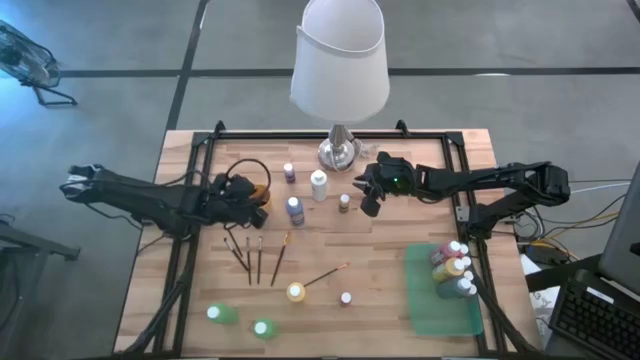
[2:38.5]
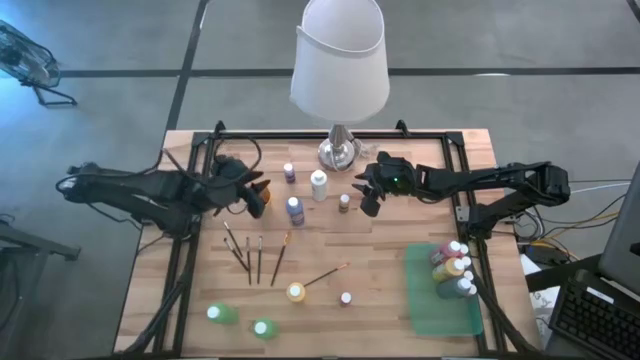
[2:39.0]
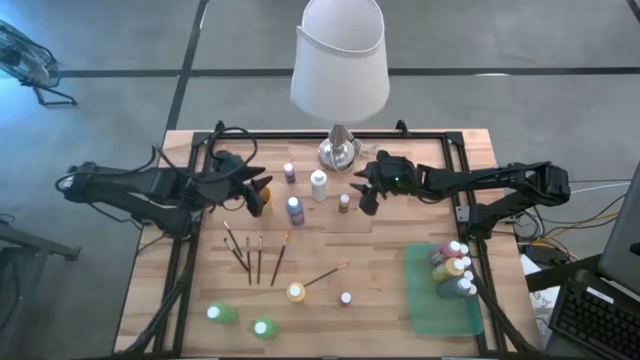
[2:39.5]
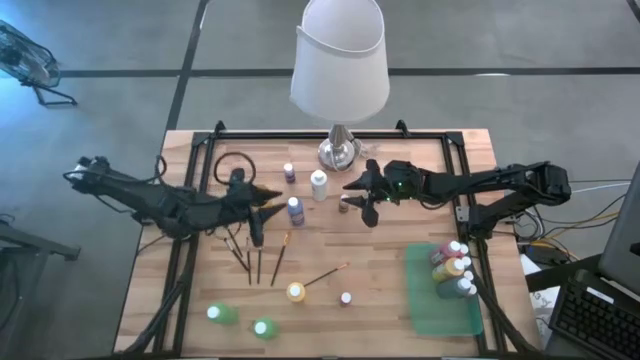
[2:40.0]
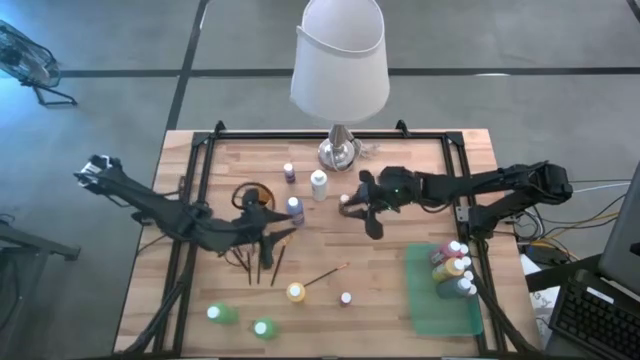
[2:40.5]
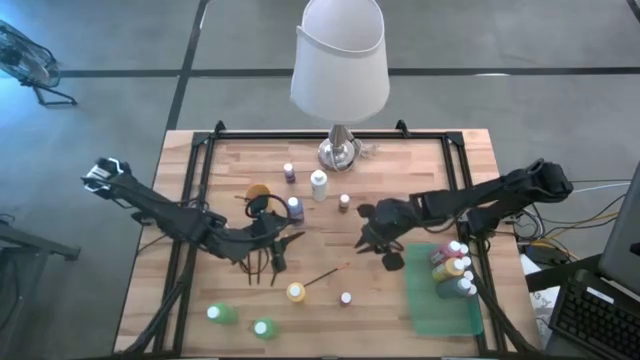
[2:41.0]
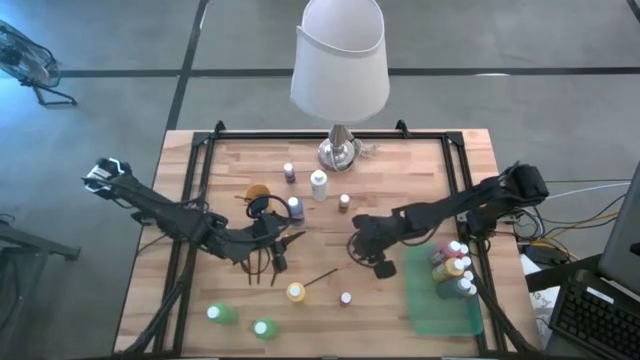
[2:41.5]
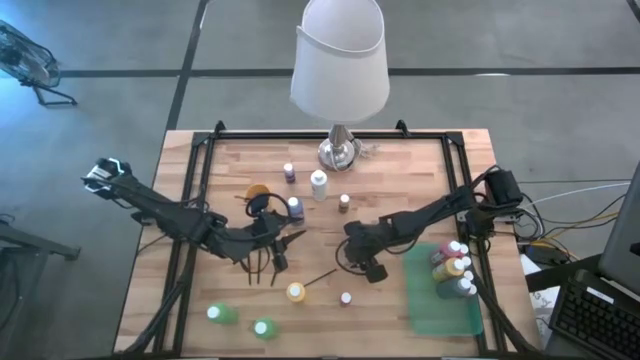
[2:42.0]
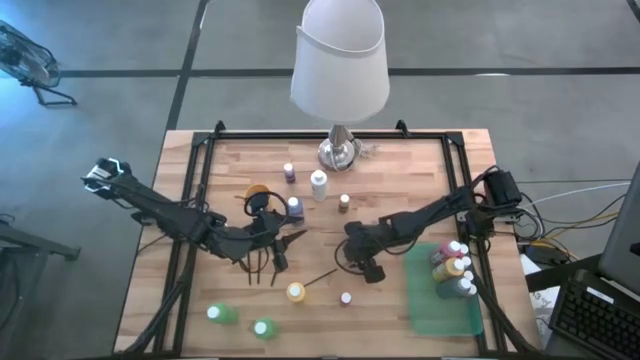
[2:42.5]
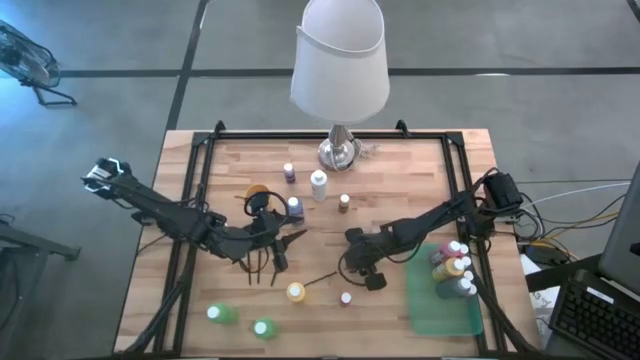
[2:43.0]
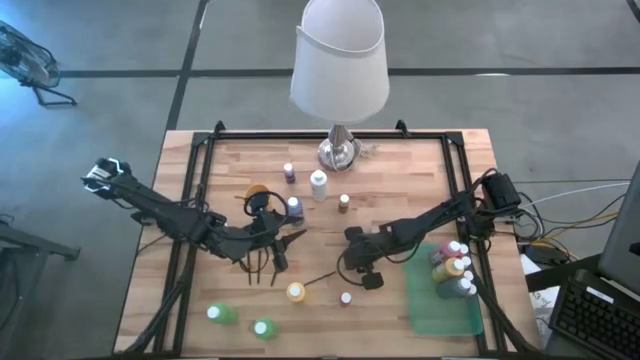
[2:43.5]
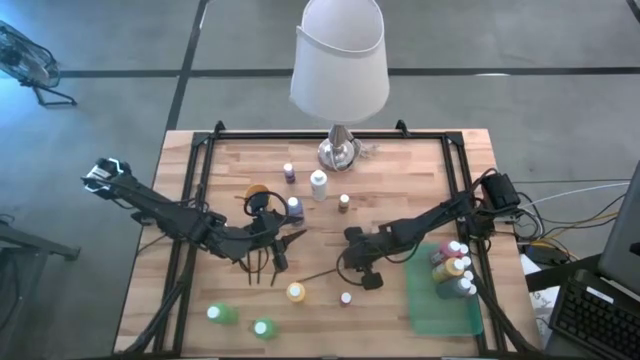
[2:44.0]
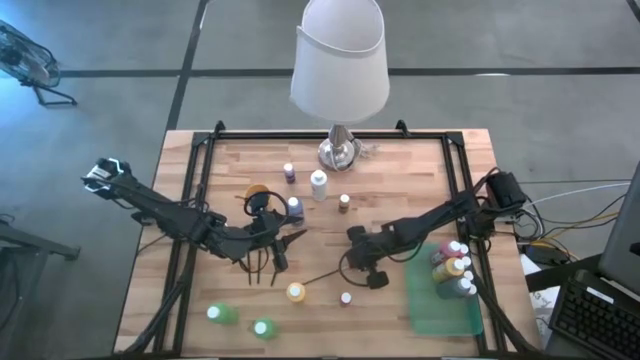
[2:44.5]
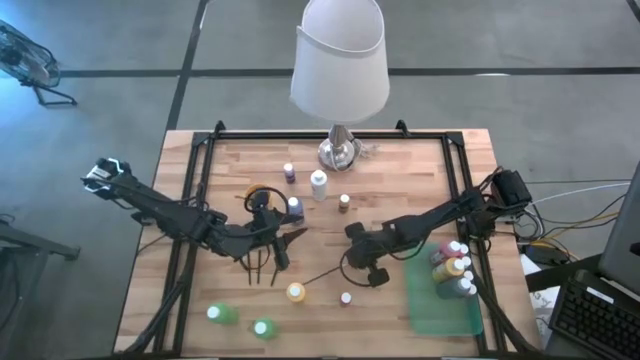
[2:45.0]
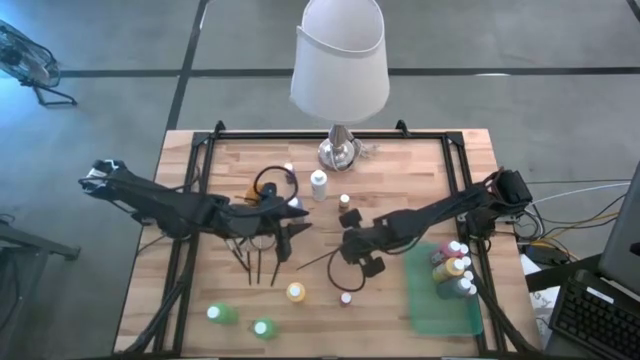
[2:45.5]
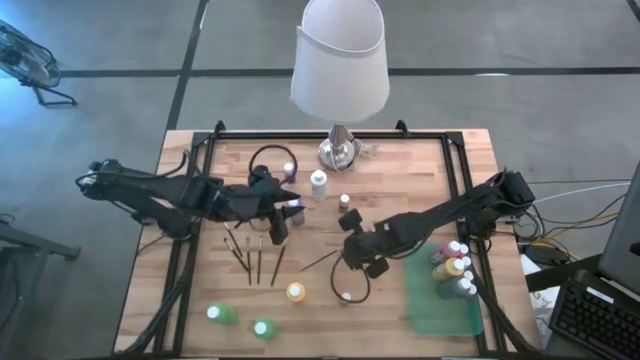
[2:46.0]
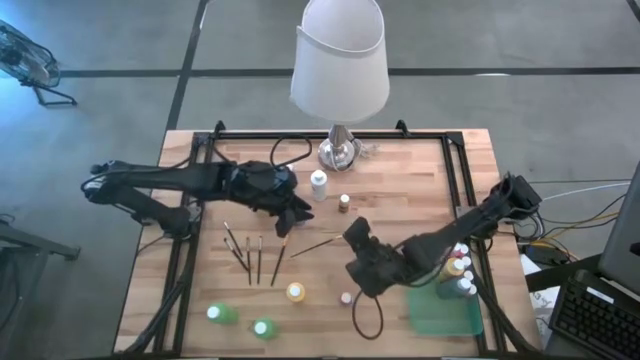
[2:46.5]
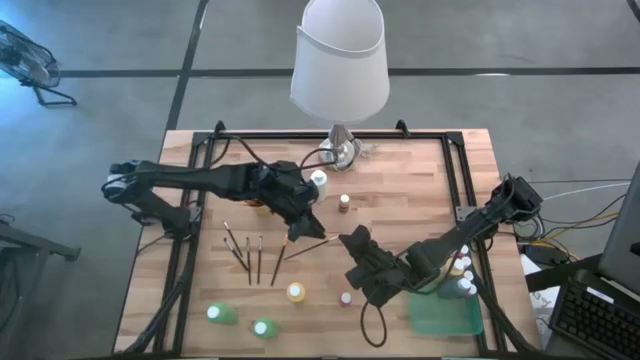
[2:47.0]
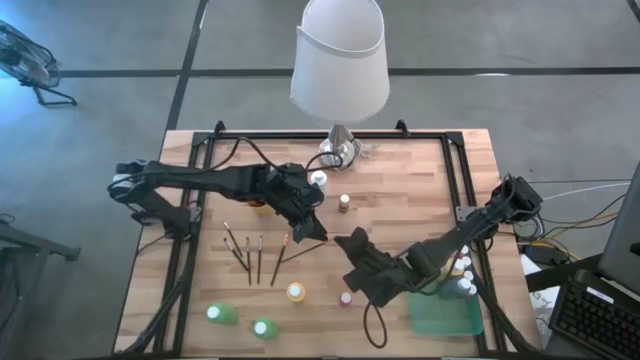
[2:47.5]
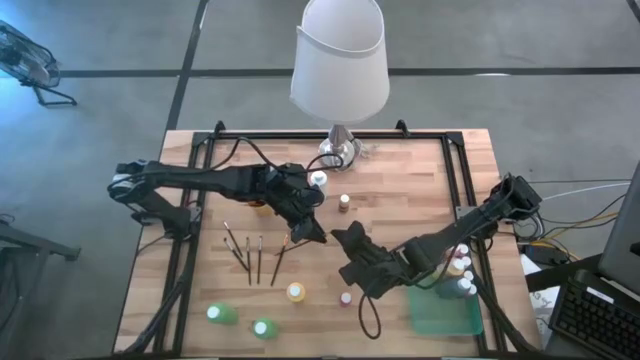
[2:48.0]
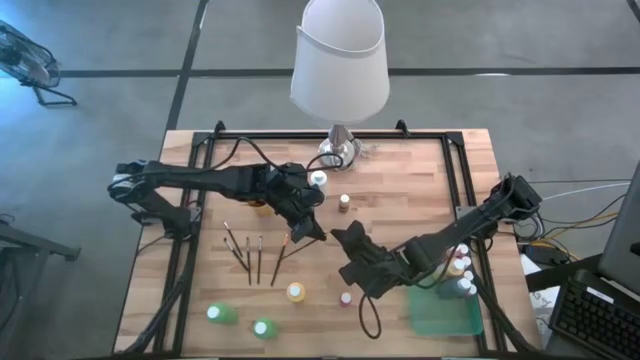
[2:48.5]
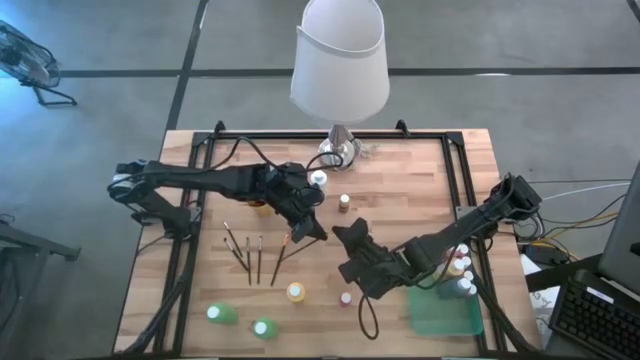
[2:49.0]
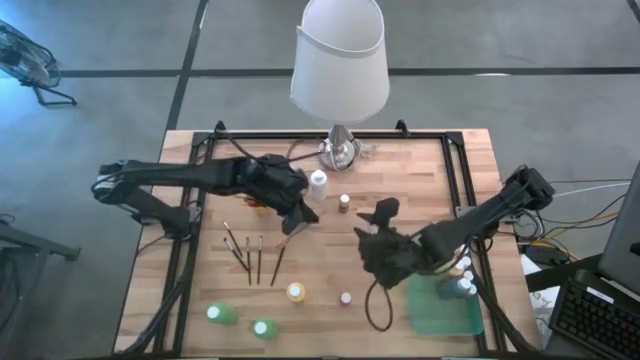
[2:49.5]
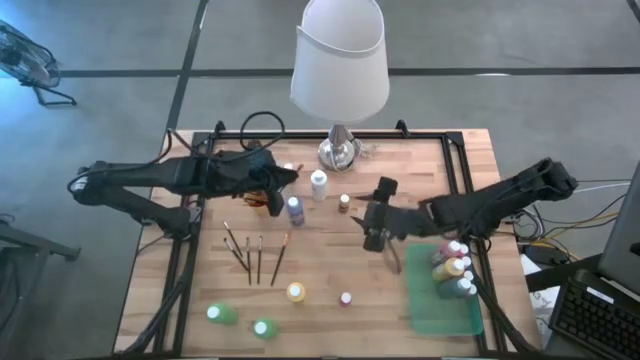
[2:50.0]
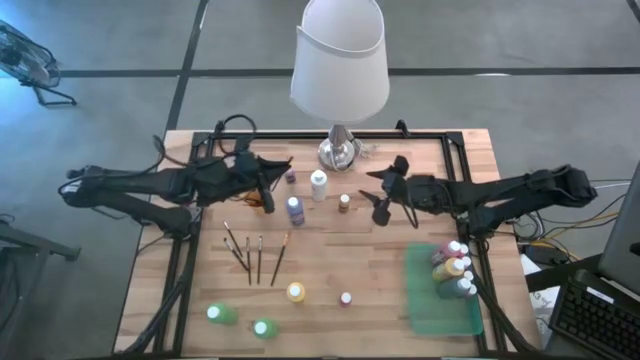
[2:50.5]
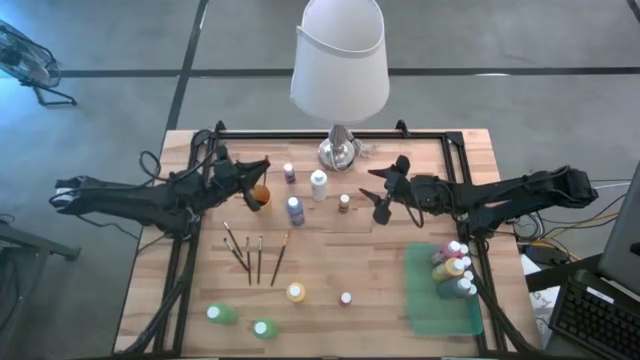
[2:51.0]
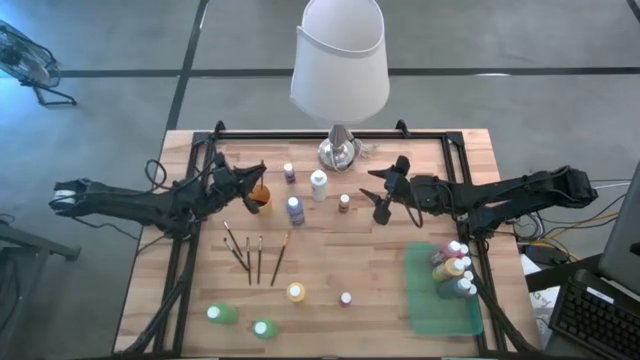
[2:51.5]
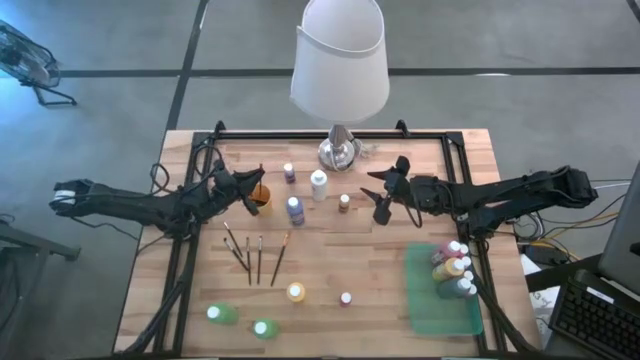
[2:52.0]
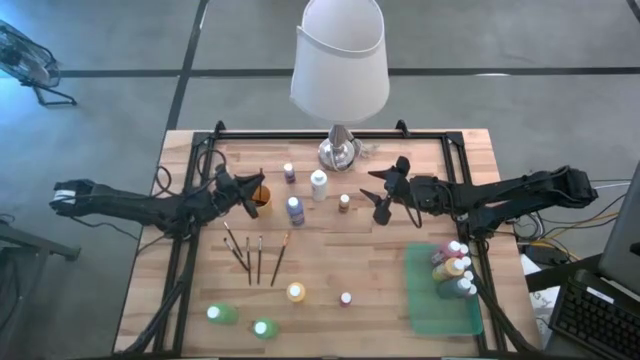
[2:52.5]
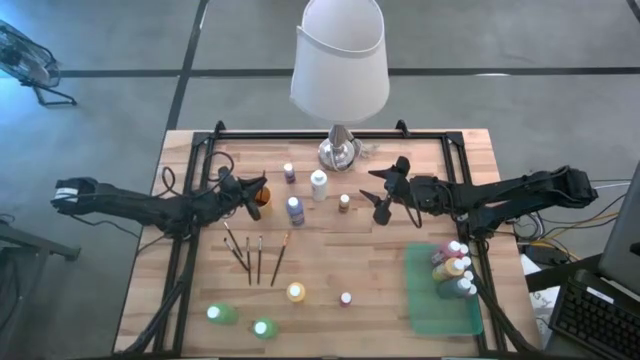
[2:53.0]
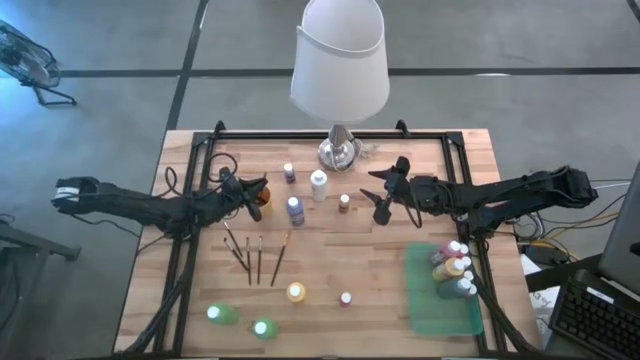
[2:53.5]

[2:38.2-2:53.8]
Task: Pick & Place Paint Supplies
Put the gold paint brush into the yellow cup
